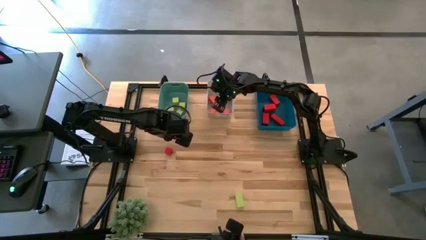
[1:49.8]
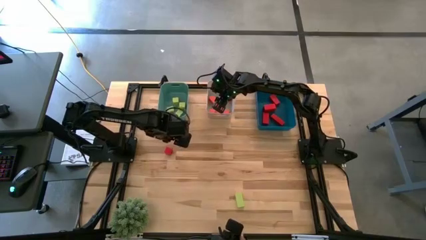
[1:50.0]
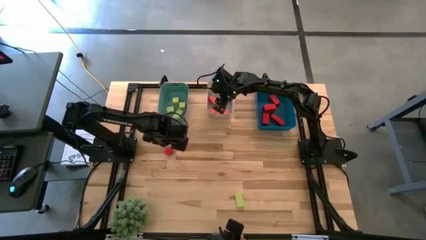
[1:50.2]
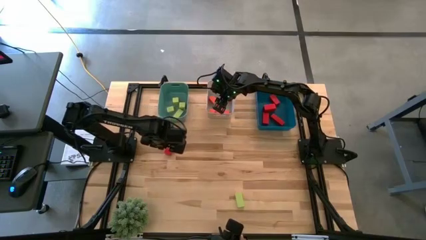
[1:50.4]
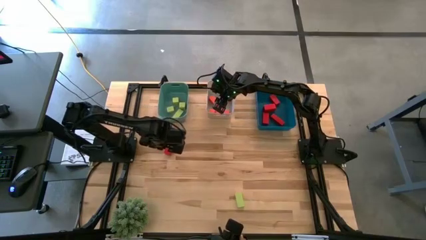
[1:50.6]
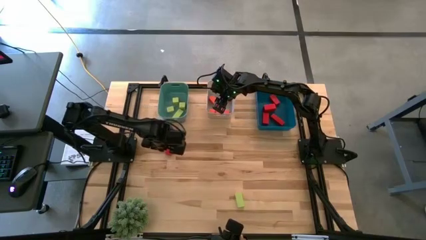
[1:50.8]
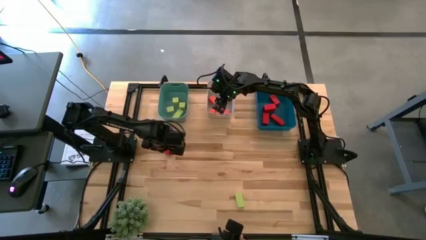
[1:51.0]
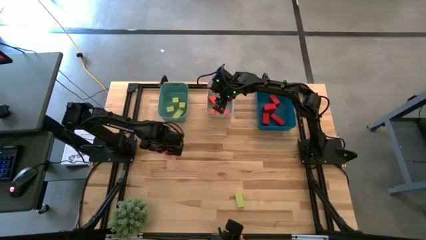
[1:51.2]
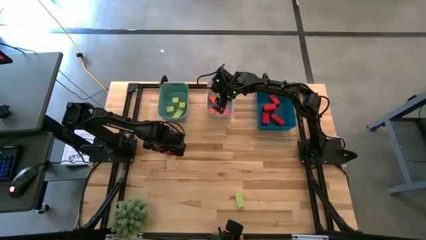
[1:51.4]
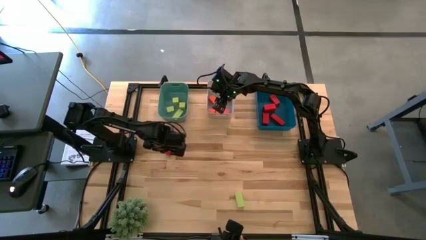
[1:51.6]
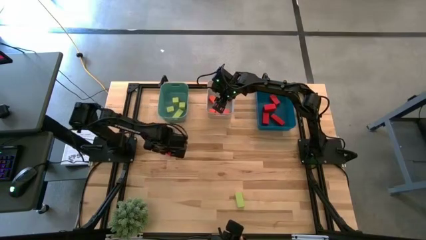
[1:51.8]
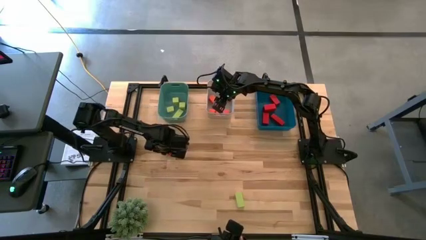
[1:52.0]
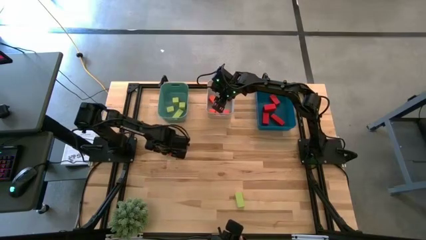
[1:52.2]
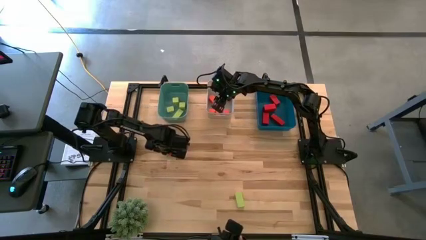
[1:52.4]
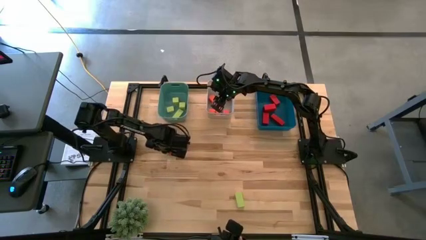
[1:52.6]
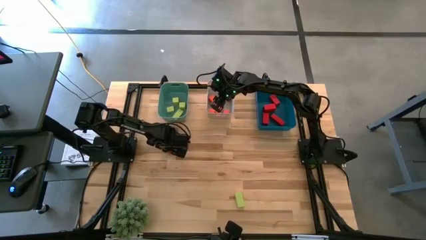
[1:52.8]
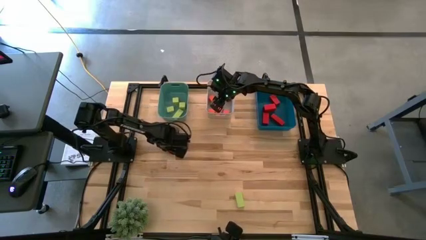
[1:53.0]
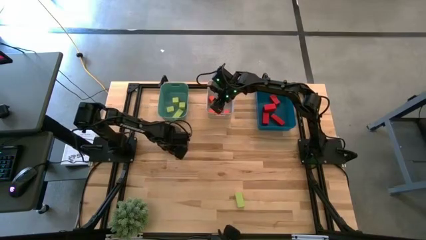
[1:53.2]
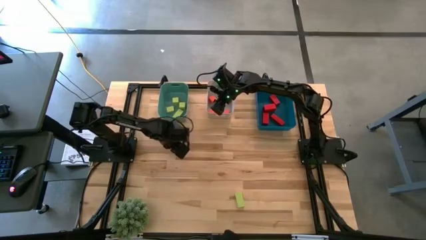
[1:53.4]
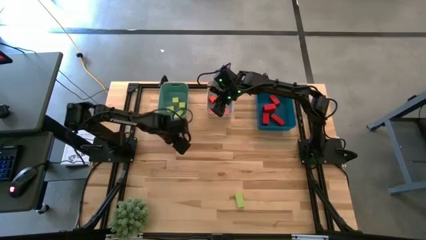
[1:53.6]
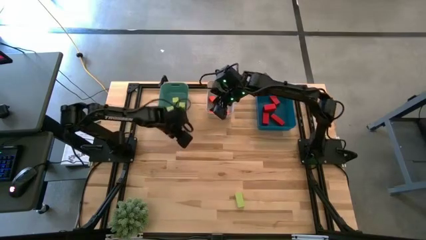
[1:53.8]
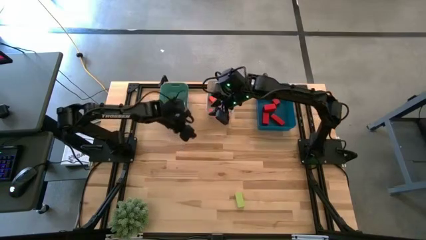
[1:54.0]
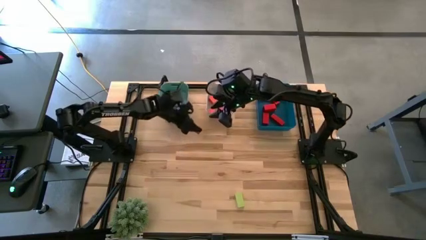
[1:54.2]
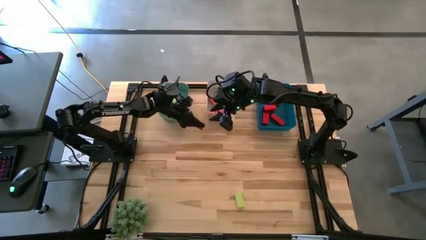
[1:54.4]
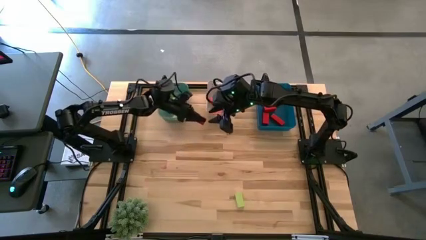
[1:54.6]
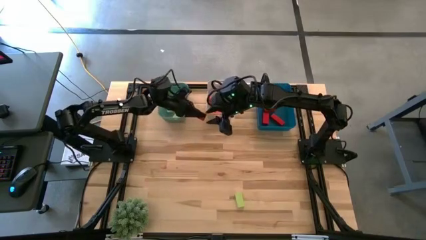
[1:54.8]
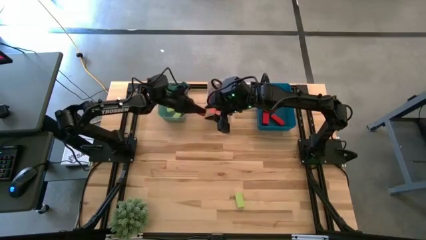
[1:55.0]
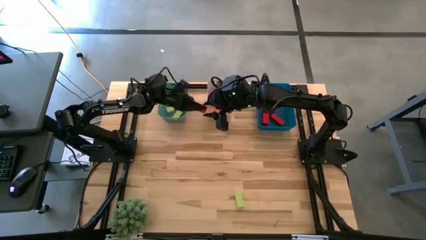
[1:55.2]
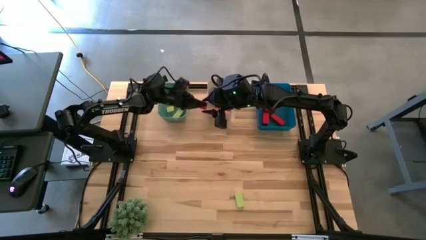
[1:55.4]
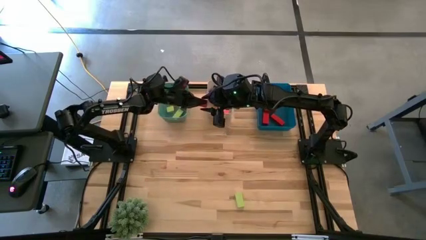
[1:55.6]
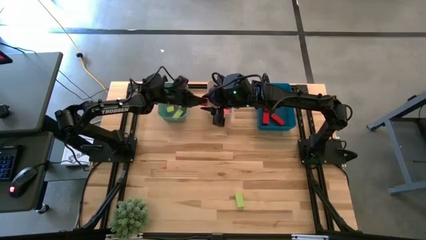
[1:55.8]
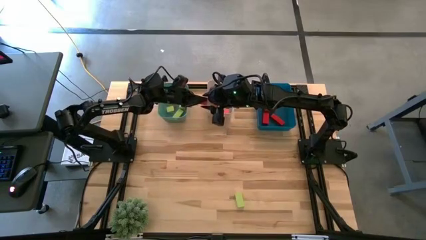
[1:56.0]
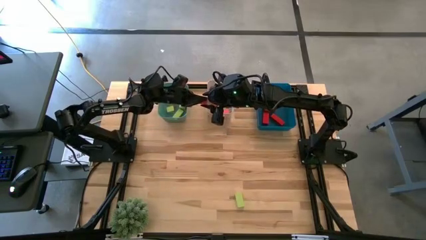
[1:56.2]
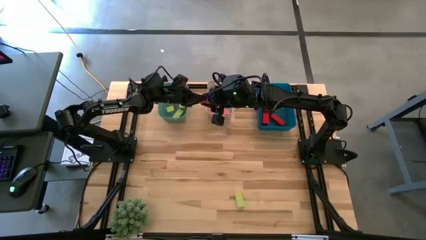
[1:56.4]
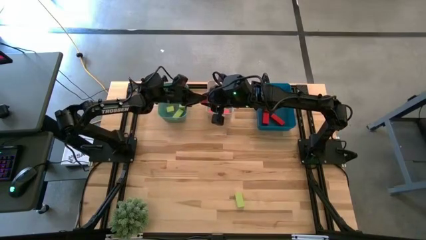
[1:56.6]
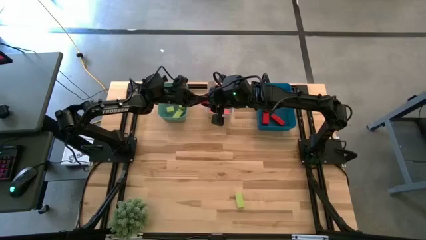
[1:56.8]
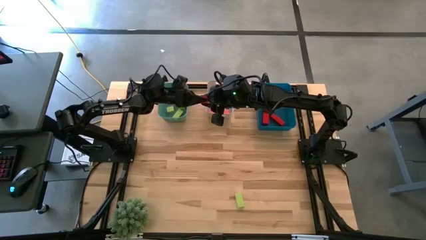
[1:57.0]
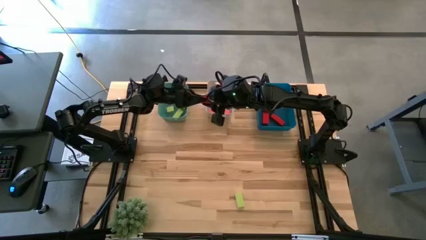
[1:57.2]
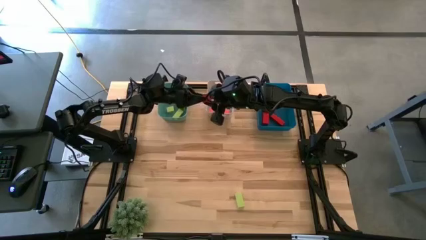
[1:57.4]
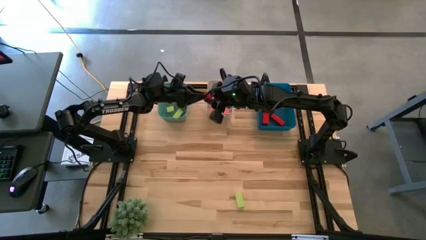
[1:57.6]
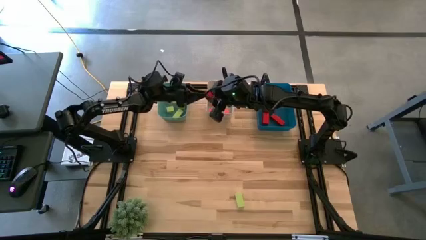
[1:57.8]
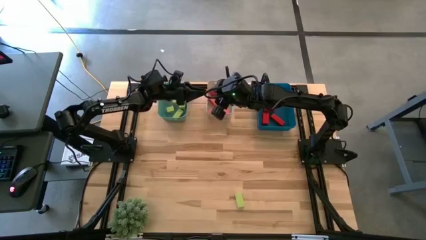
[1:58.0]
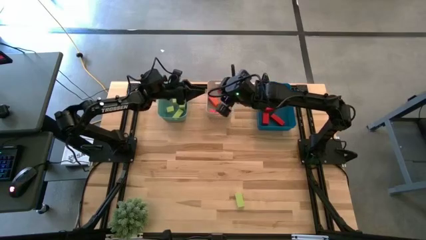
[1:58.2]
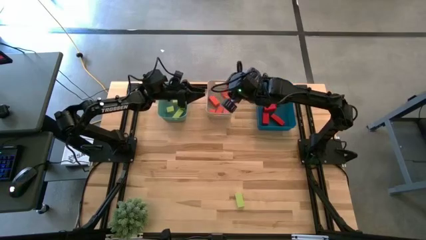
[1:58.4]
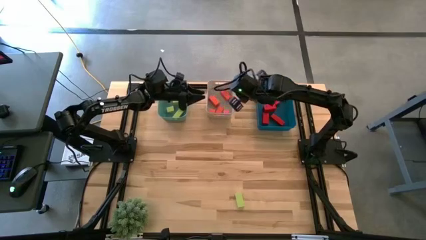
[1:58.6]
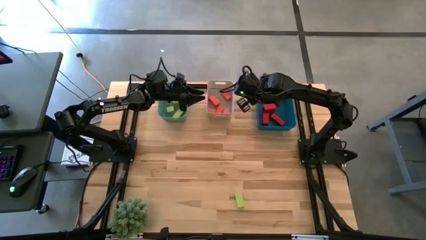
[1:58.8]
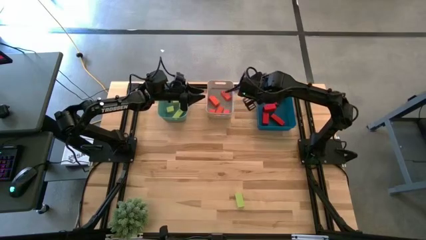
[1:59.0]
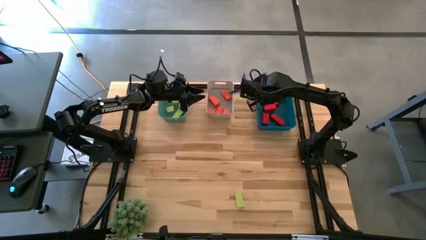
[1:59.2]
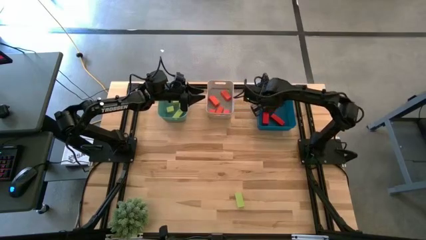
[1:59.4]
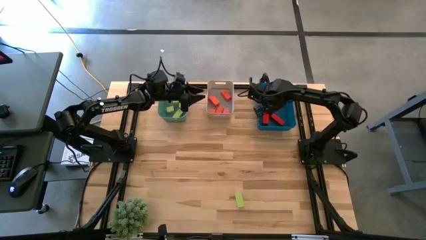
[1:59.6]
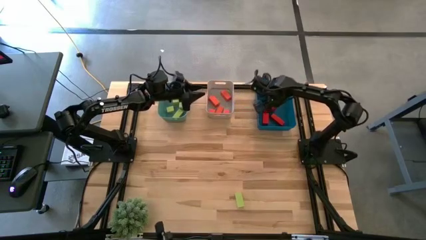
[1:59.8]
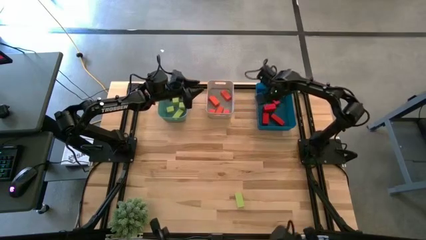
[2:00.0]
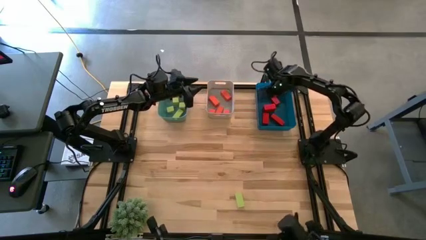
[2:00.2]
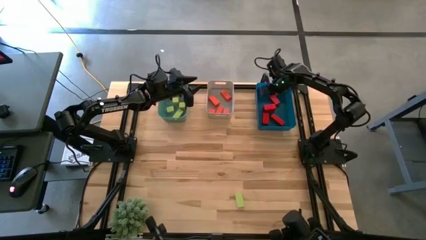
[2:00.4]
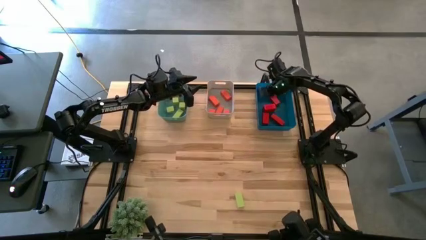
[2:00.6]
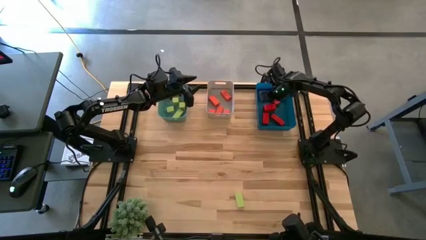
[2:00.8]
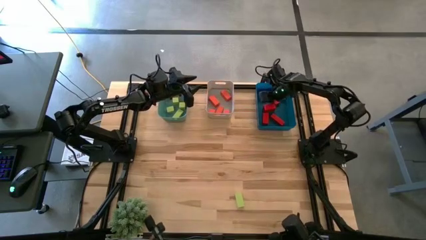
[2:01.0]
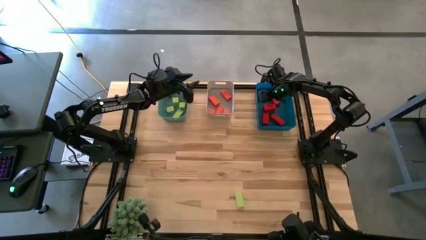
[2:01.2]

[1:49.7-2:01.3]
Task: Sort & place blocks by color
Put the red block into the blue bin

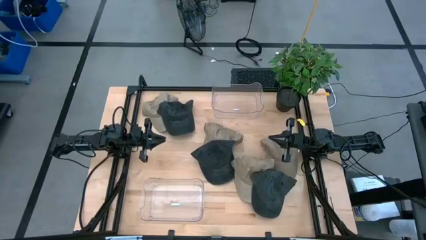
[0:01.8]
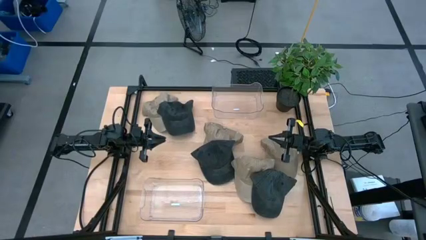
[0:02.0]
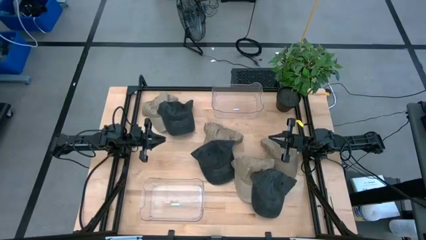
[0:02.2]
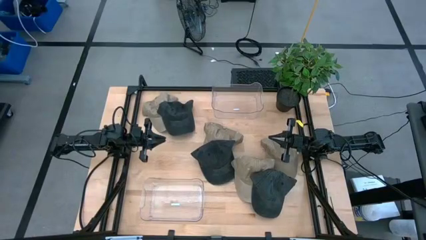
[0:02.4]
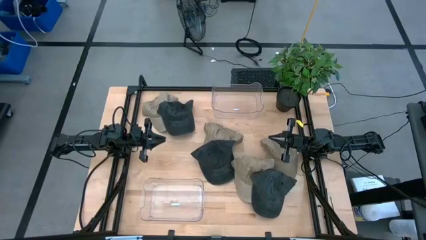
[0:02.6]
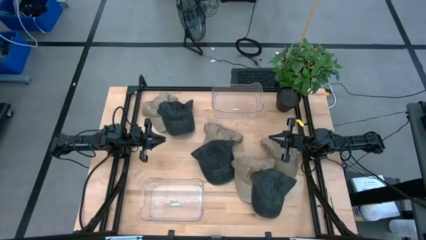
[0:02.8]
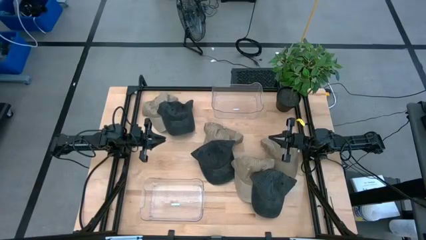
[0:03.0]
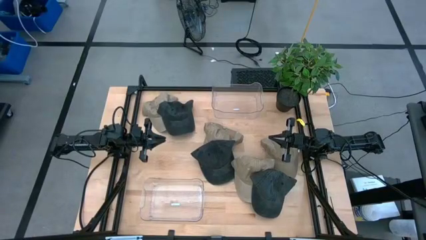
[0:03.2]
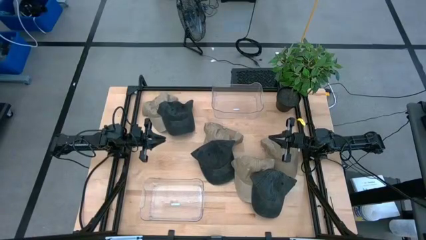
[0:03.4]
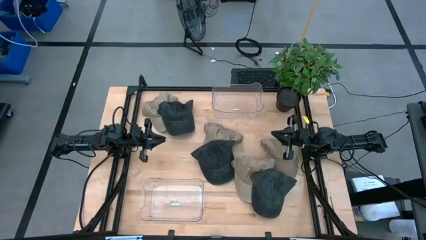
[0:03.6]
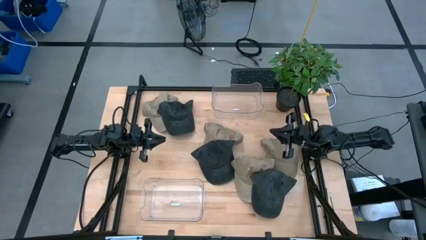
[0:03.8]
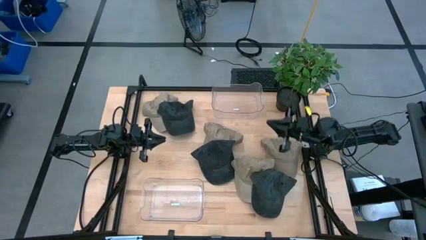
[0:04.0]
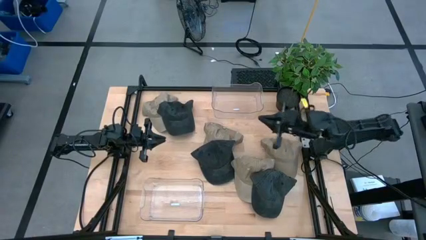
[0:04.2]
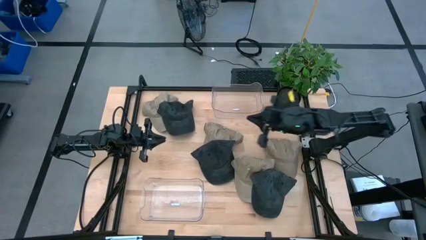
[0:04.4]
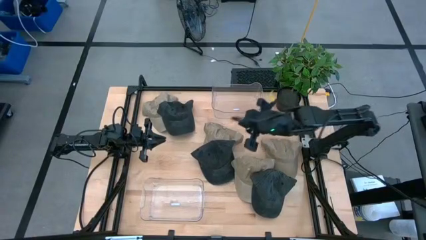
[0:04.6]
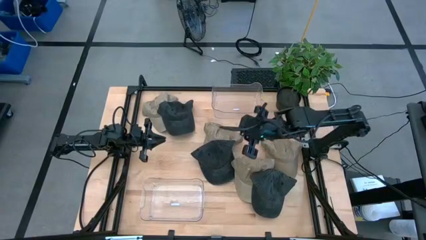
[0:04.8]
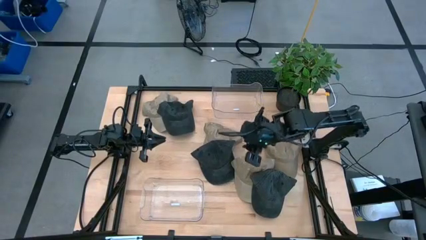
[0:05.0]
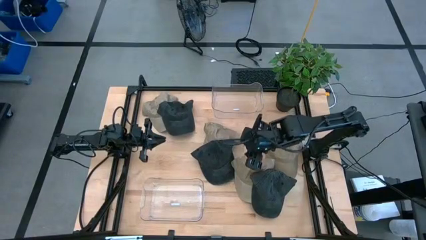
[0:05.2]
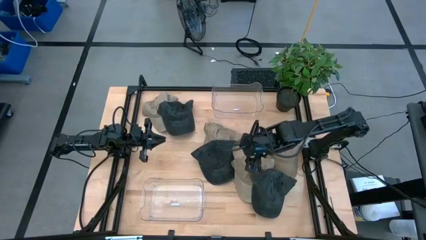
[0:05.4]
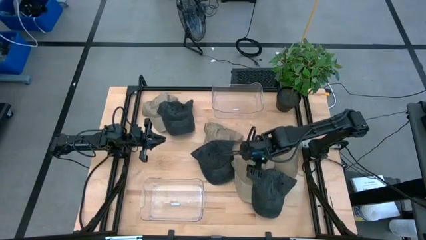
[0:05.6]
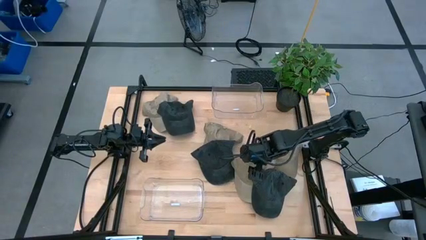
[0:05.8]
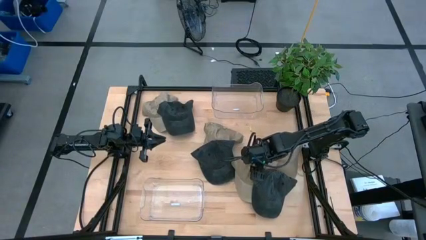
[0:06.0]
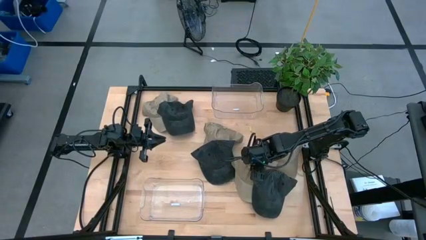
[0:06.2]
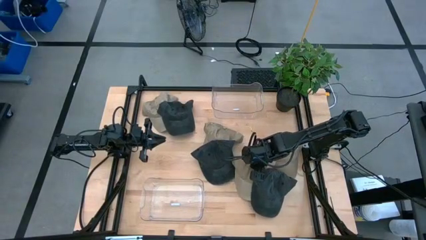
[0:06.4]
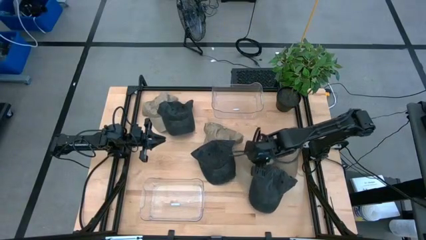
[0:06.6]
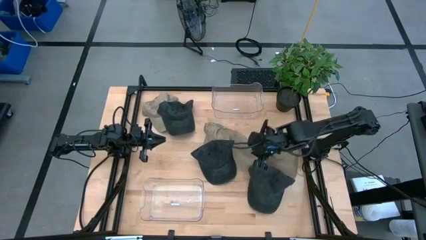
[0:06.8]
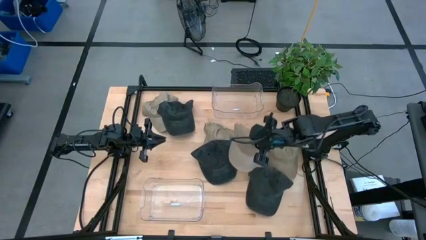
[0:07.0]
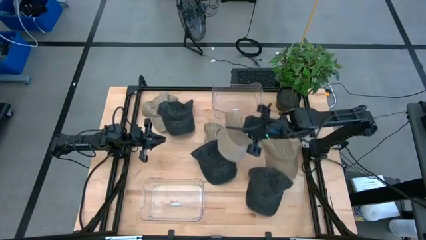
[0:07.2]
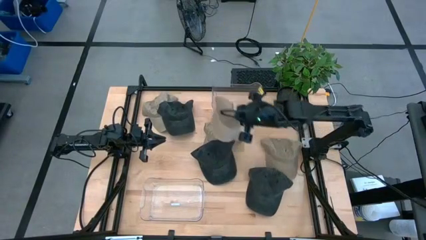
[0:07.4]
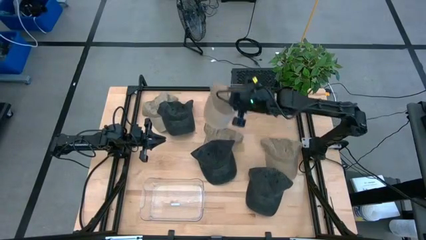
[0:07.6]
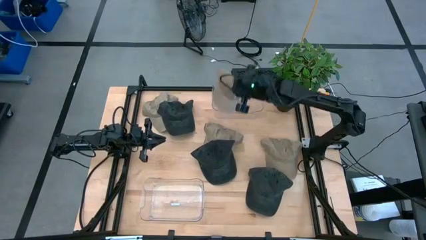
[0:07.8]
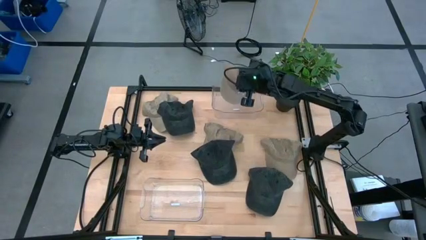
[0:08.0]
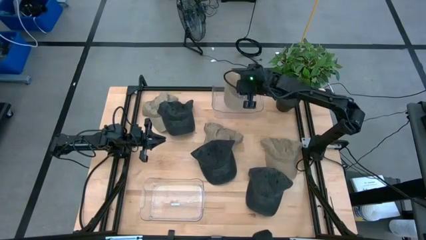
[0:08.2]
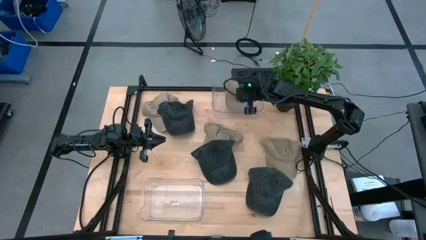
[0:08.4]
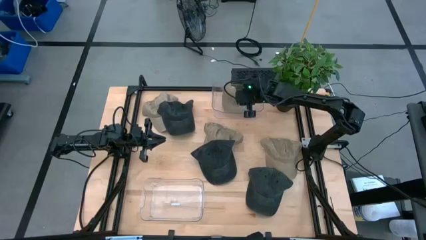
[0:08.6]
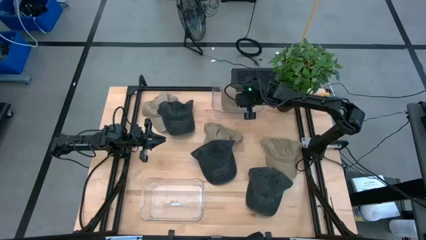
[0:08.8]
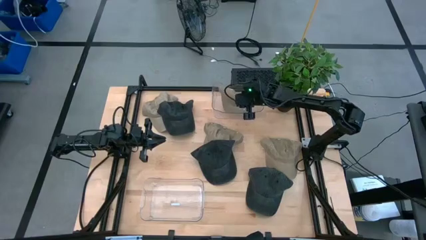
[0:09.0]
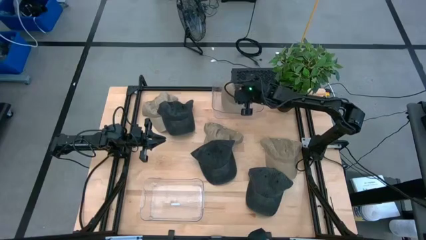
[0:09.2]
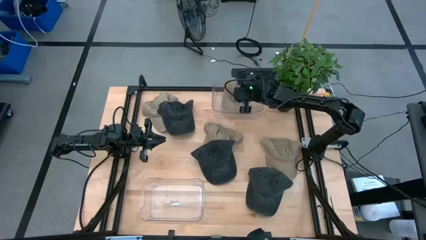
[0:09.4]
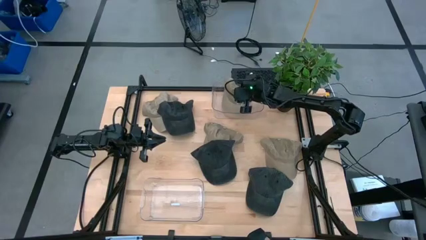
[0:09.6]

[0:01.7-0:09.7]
Task: Pick & Place hat
Put the brown cap into the top transparent bin
